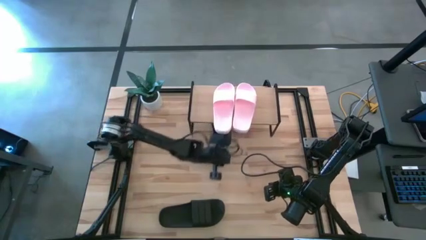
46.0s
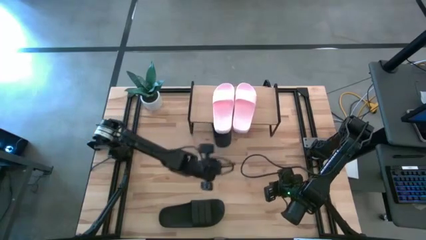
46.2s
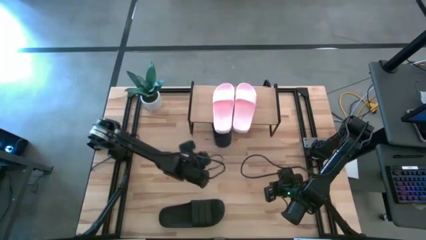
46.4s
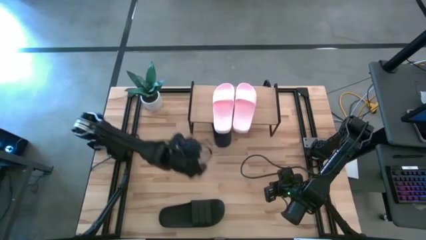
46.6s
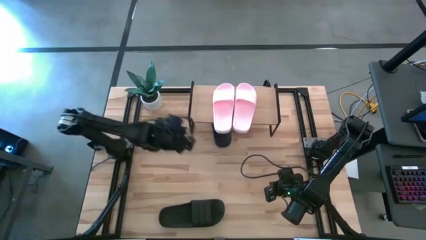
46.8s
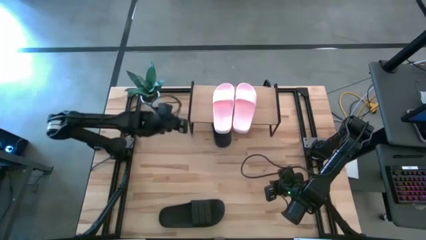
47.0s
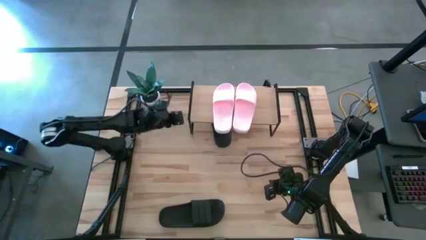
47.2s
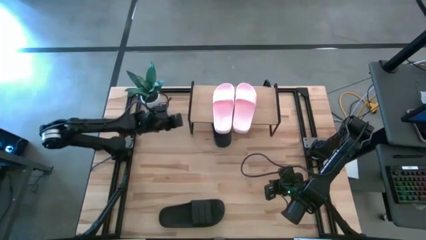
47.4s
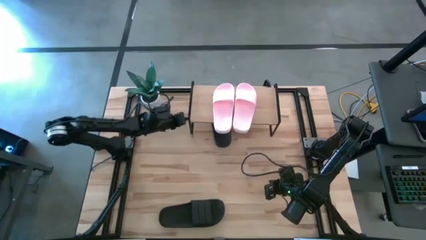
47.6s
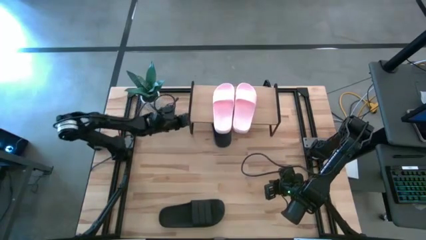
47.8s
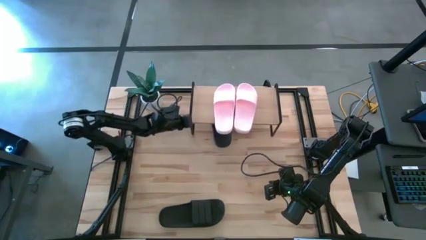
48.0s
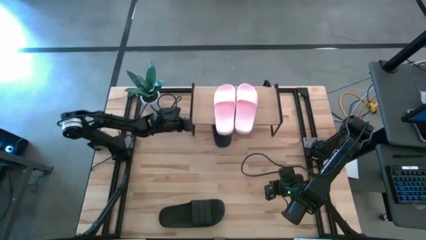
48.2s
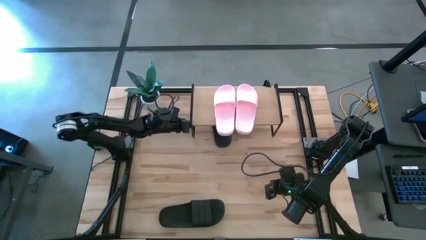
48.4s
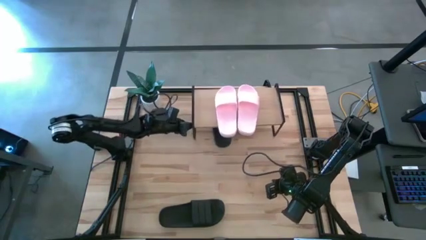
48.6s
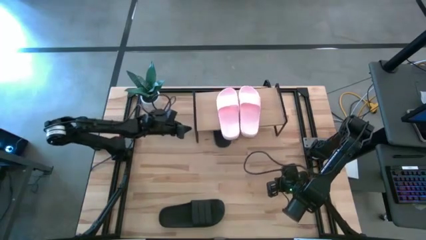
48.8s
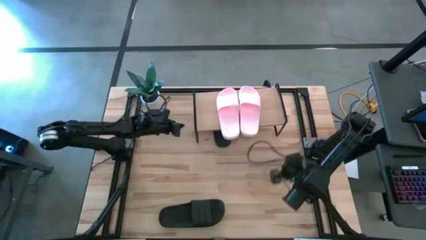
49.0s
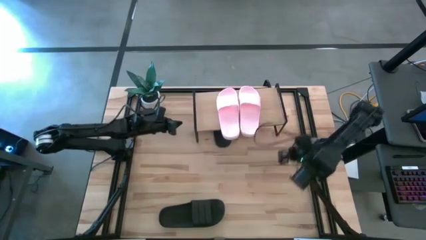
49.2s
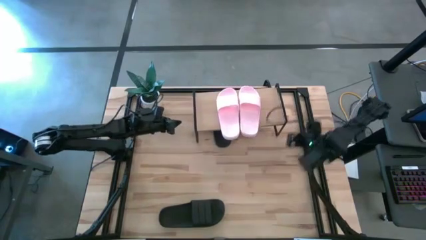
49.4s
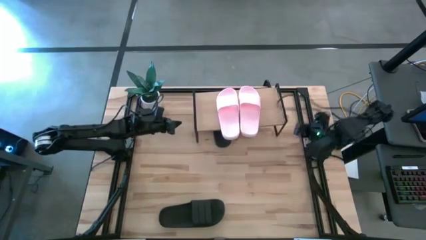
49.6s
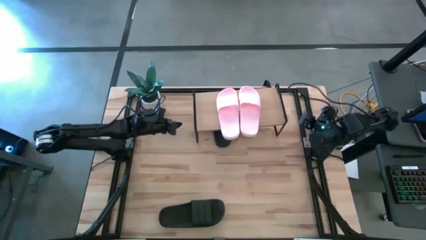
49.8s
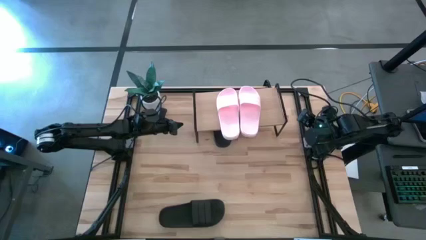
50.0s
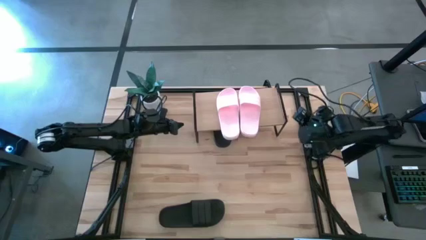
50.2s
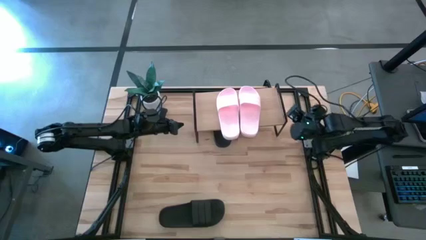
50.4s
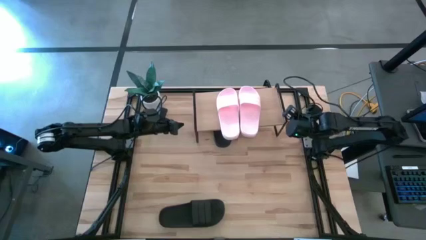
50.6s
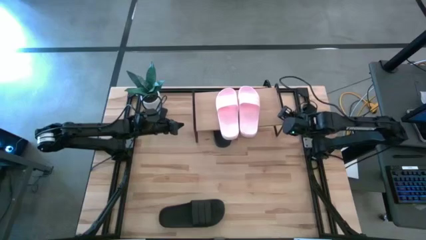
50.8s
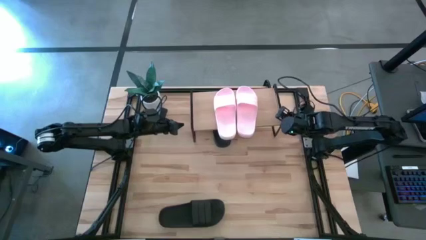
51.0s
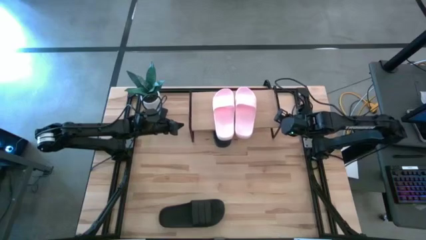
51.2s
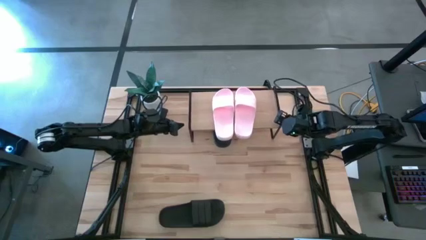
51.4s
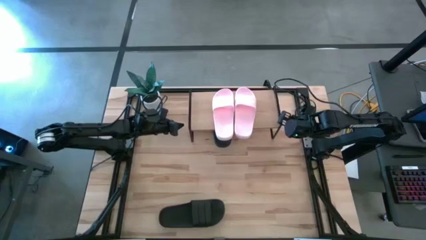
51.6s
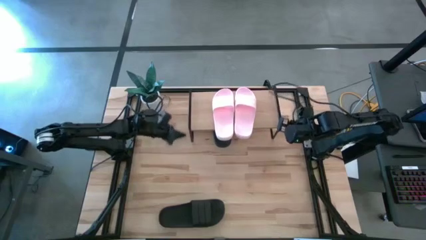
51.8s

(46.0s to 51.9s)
Task: Pick and place slides into the shelf
Adjust the shelf on the table

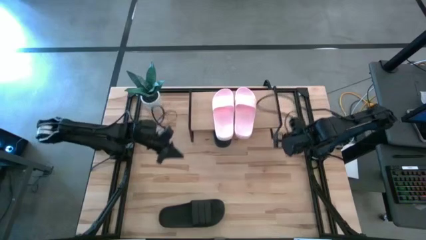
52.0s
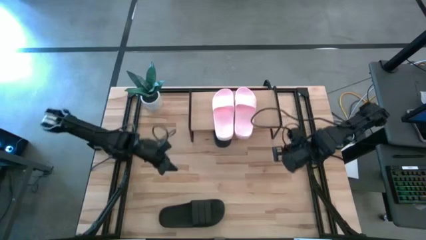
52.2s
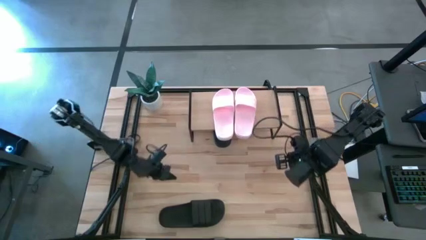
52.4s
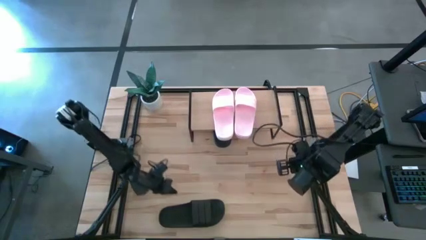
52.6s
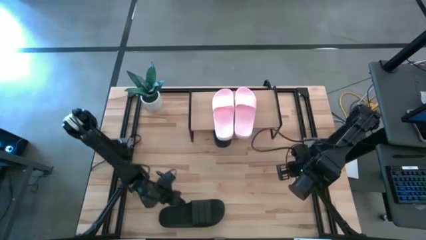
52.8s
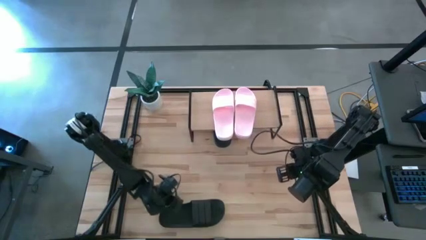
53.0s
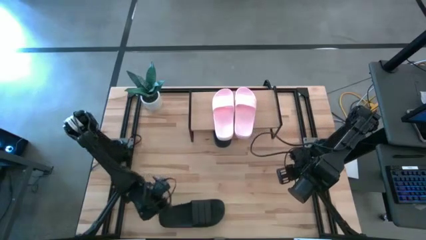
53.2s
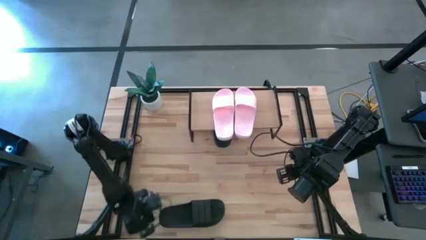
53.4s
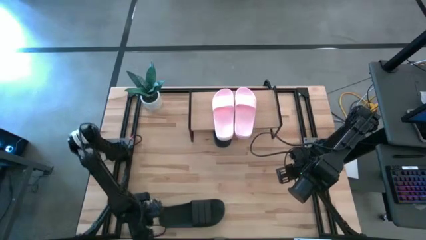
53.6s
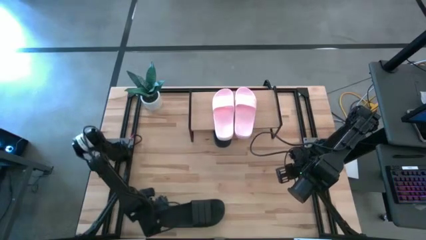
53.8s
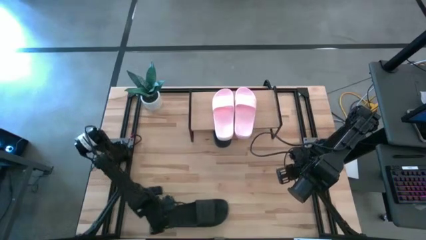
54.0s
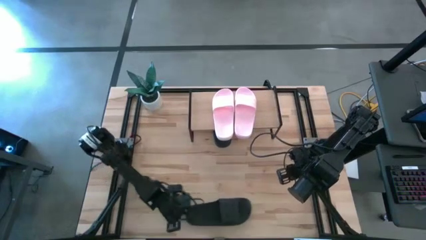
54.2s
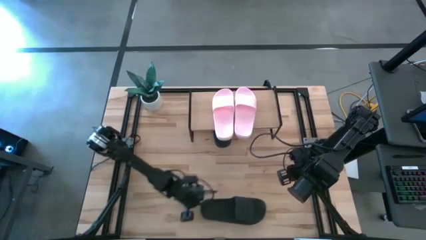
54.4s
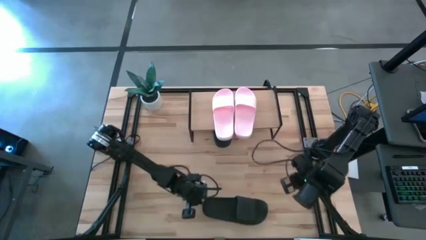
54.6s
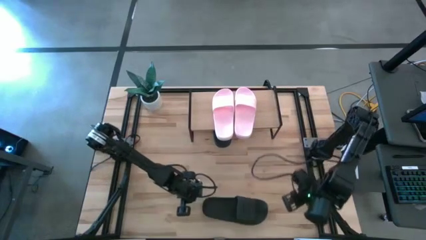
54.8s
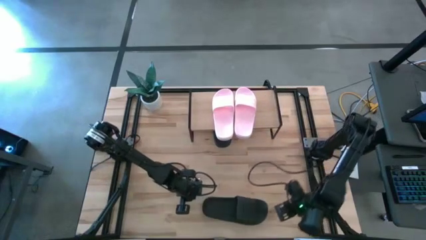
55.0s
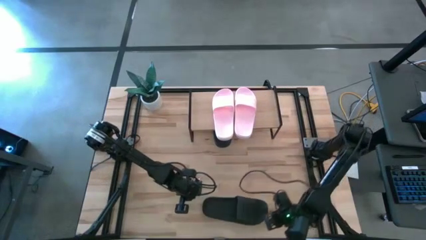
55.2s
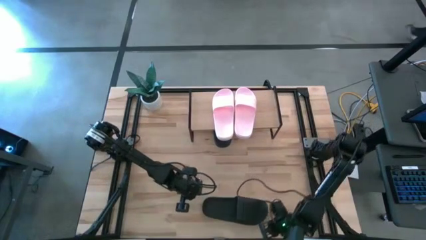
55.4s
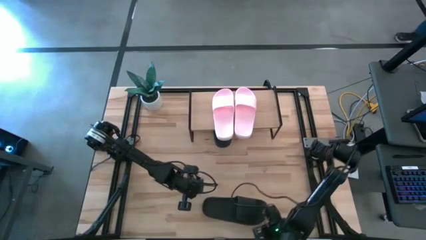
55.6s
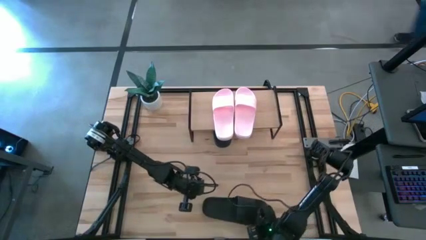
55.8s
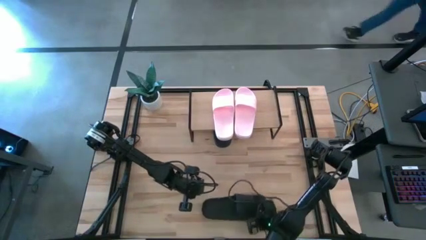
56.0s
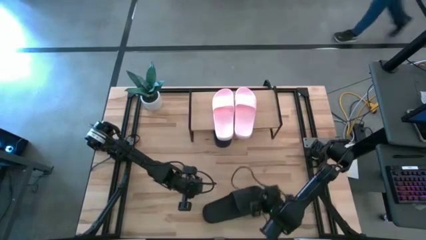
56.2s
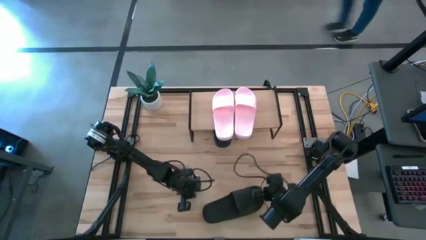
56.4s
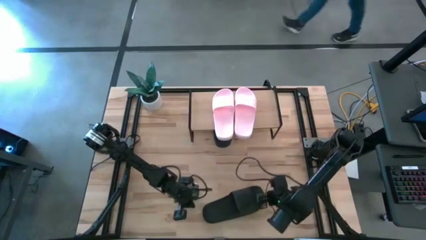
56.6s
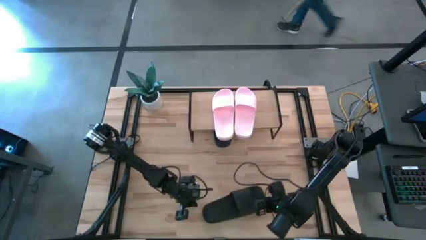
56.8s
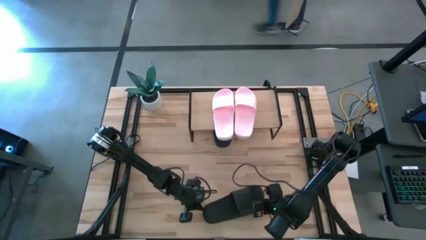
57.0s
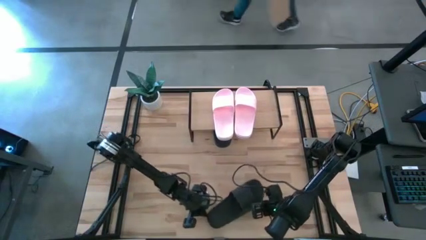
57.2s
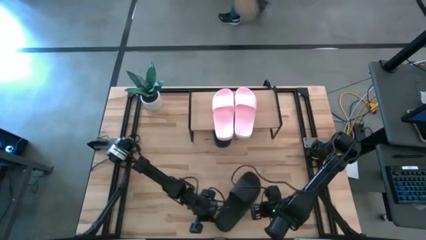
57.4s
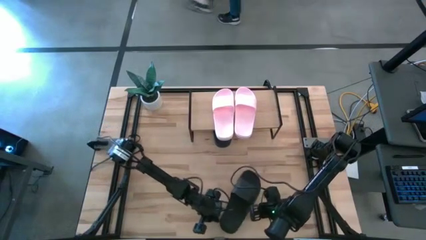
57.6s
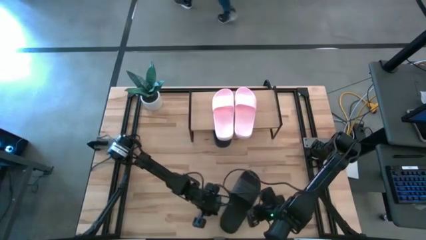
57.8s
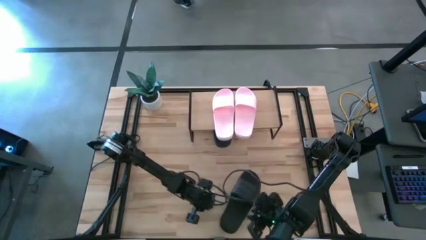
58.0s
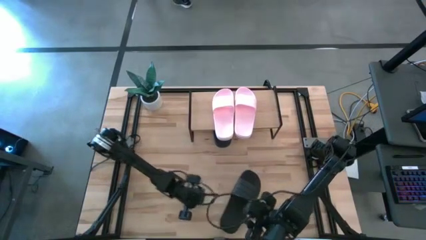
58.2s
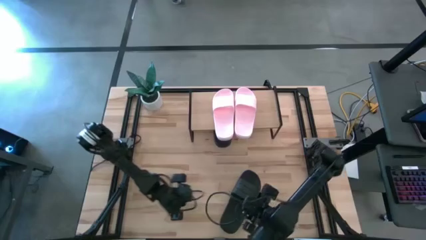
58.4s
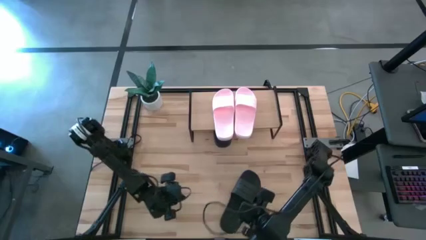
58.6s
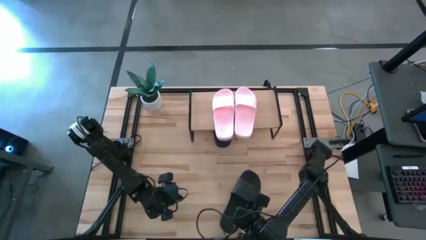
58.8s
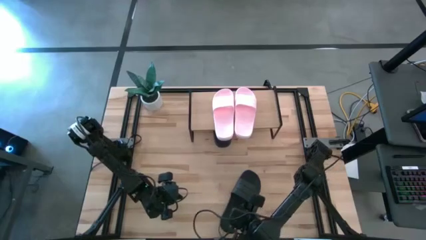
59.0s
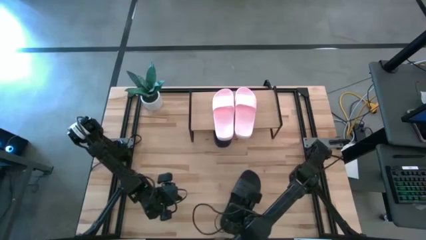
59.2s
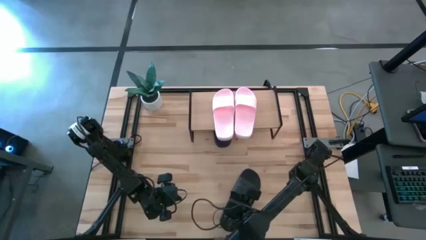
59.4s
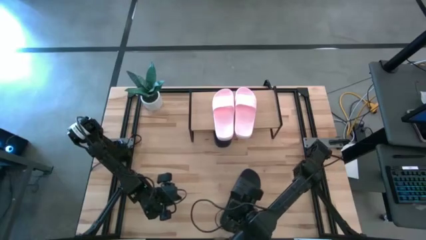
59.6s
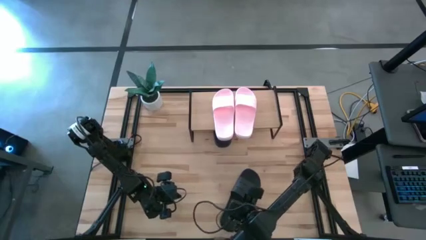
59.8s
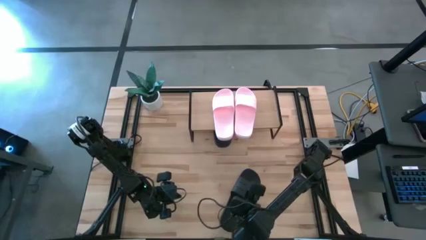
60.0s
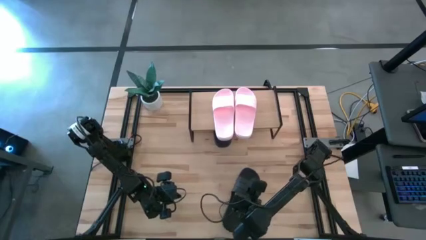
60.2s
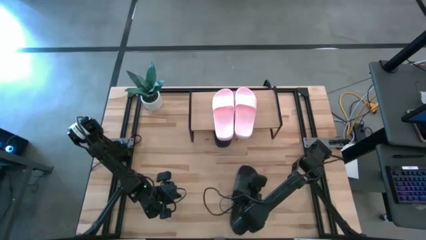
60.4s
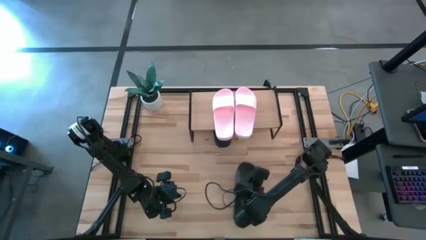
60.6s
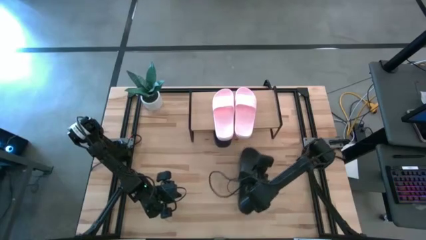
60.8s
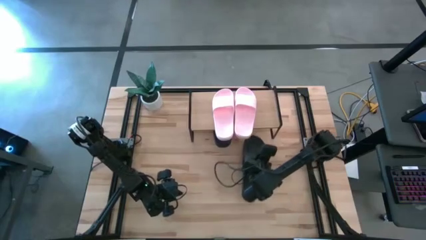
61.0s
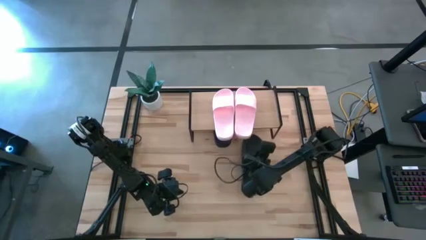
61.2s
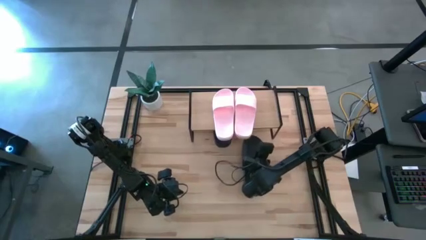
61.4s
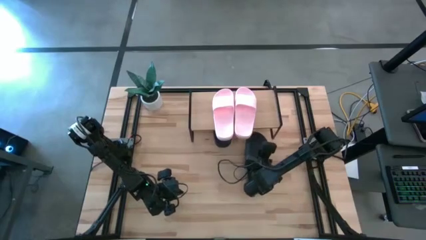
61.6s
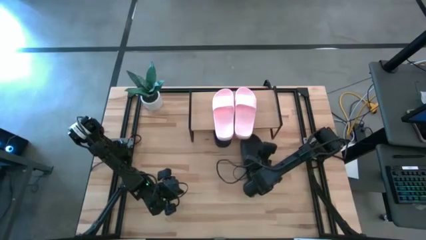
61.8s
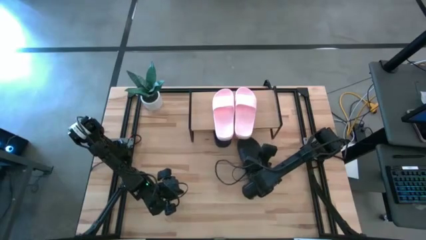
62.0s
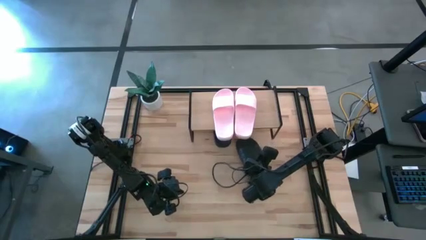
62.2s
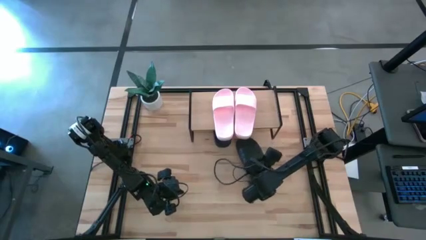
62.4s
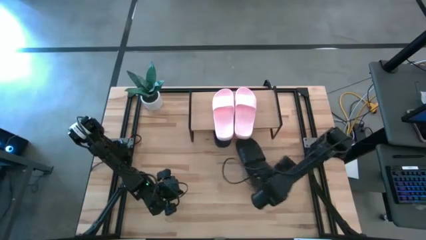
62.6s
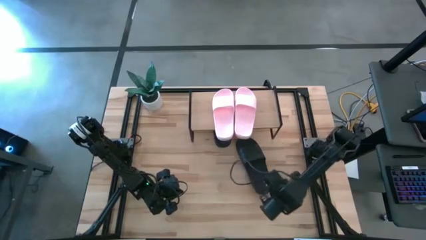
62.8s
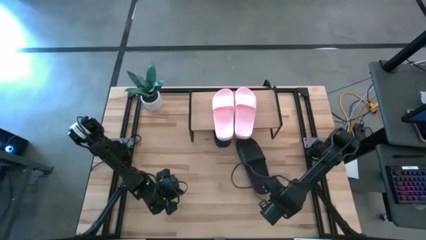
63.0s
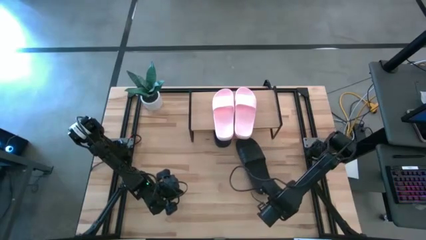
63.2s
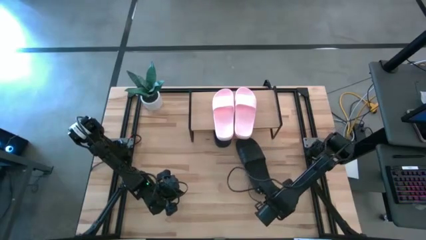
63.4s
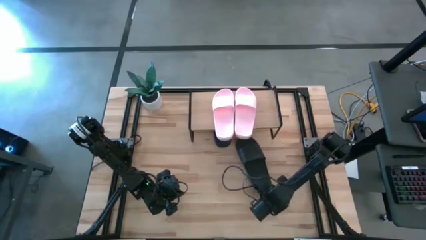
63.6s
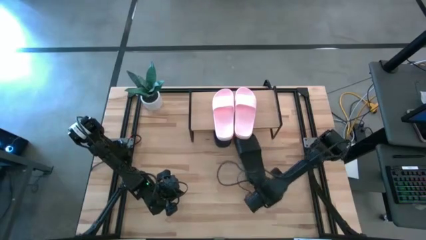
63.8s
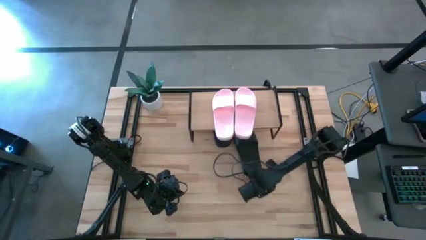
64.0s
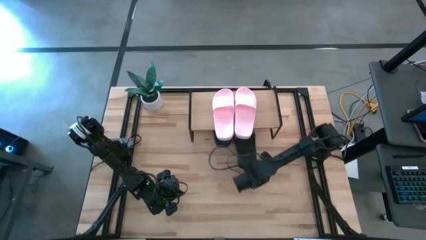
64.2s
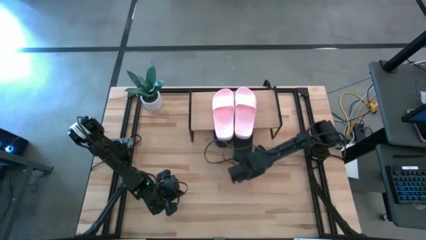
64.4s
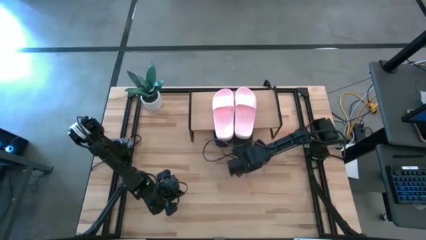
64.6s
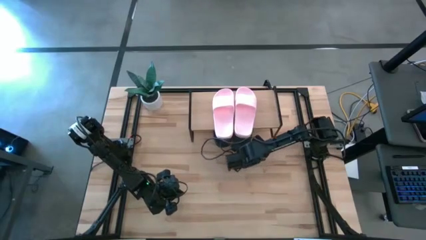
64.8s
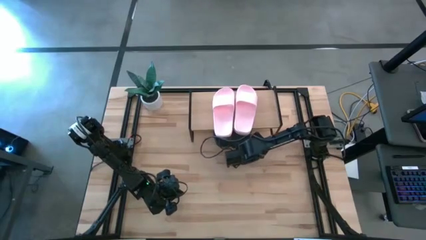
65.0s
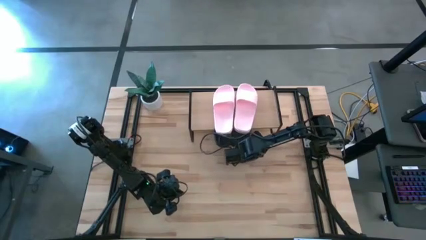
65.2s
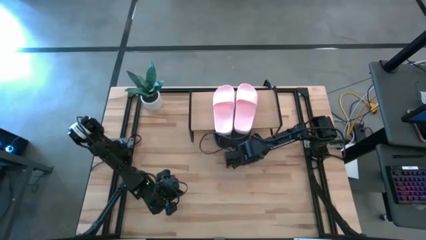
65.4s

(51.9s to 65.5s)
Put the black slipper under the shelf
